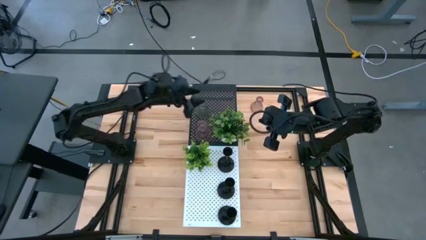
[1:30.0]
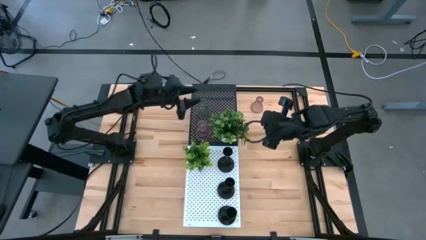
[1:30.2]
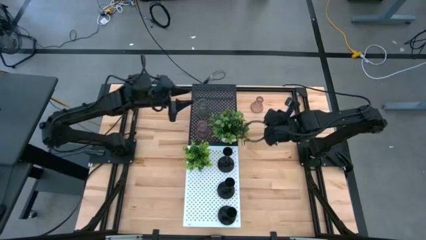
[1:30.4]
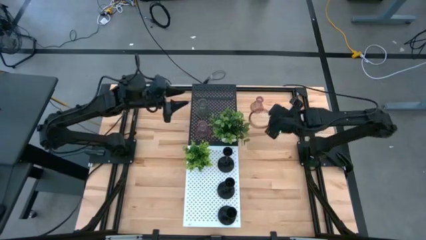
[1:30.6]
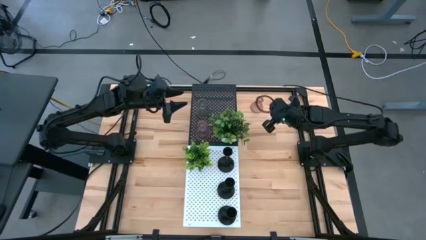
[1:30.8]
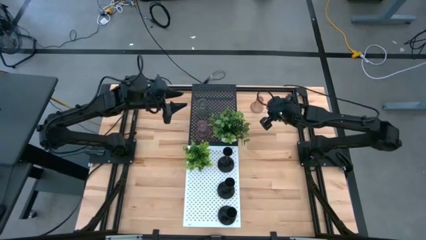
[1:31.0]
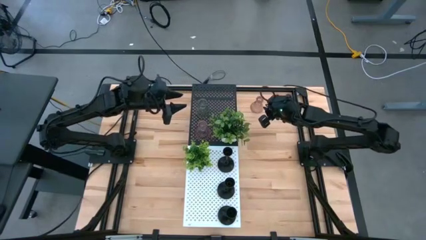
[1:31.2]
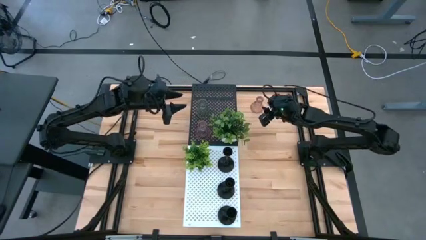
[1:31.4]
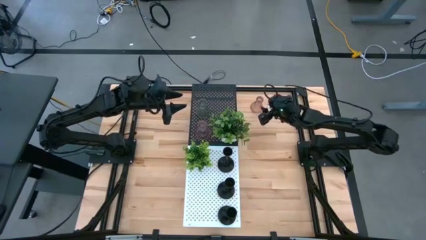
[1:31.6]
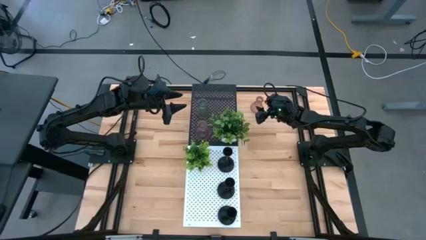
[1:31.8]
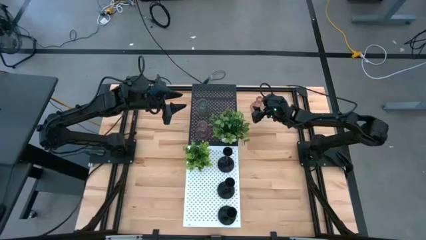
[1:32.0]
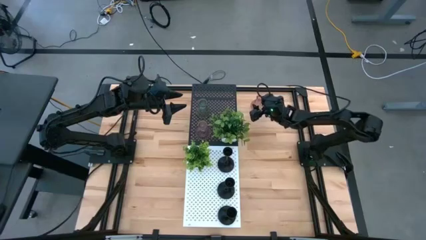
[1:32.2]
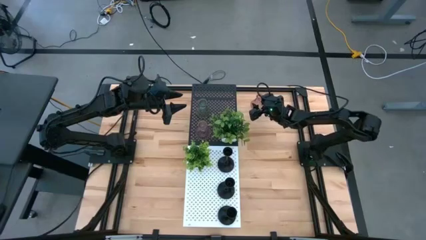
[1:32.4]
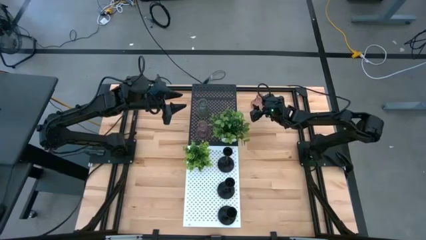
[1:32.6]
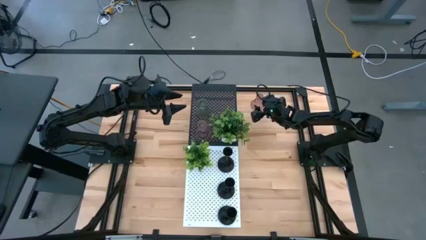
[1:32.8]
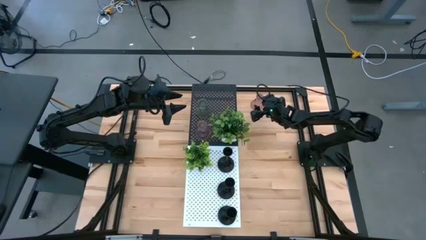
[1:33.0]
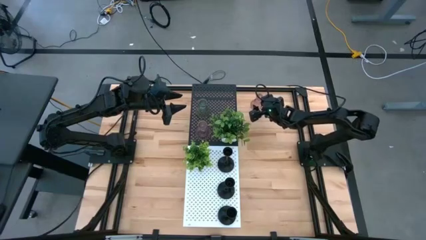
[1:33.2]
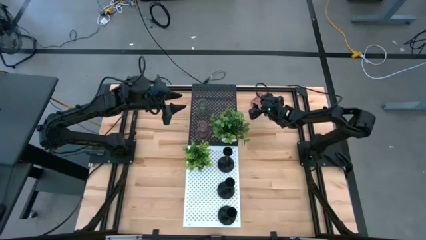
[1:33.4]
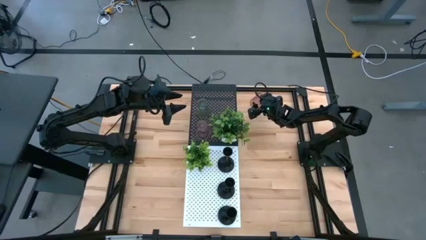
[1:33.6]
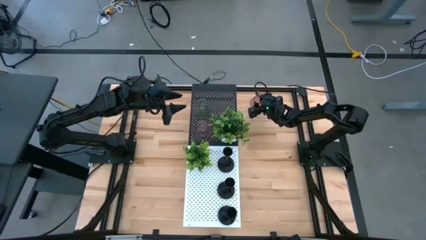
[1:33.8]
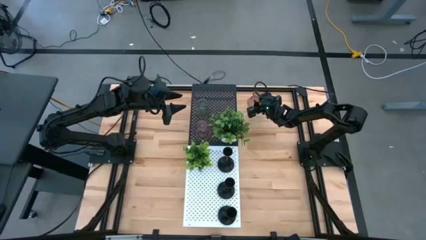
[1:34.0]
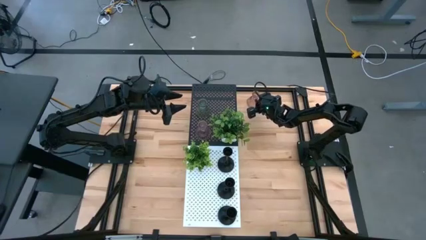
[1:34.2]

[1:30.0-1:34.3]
Task: Pick & Place candle stick holders
Put the pink glass candle holder on the black shelf

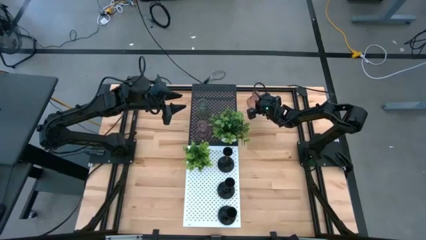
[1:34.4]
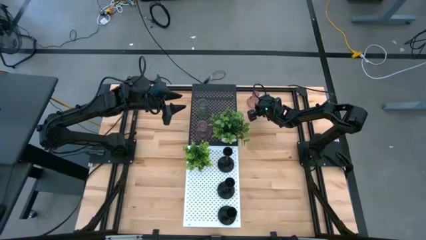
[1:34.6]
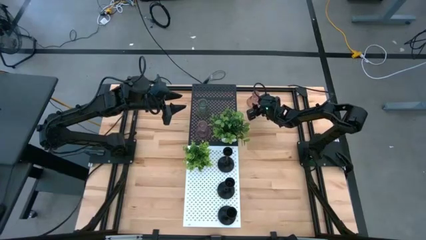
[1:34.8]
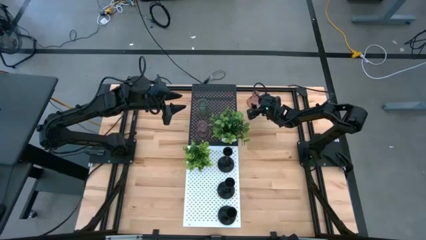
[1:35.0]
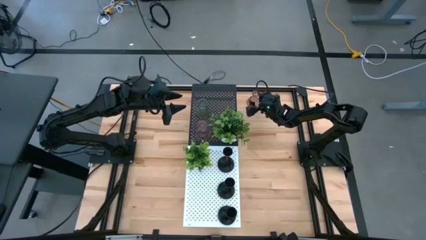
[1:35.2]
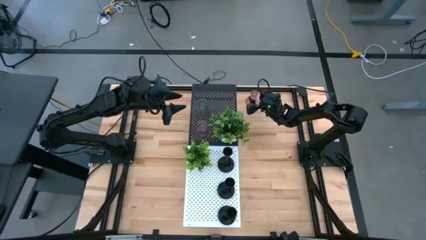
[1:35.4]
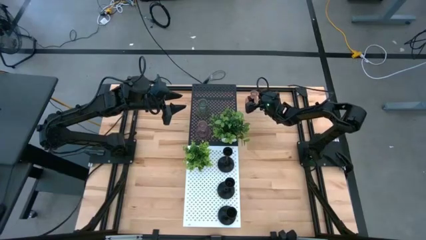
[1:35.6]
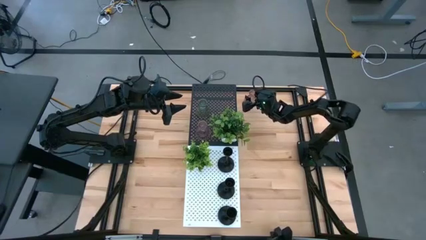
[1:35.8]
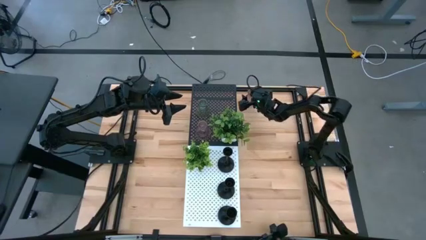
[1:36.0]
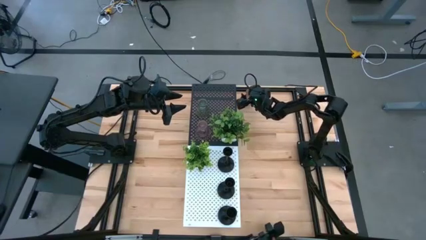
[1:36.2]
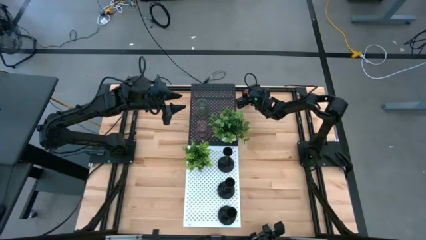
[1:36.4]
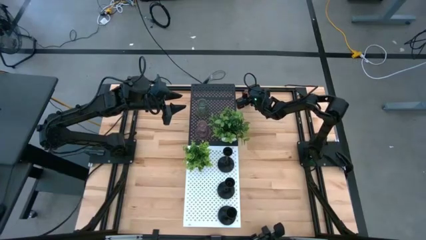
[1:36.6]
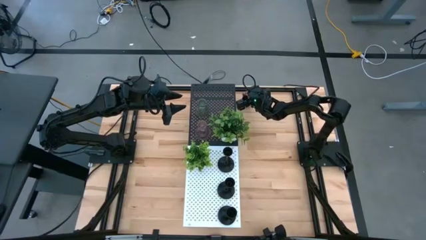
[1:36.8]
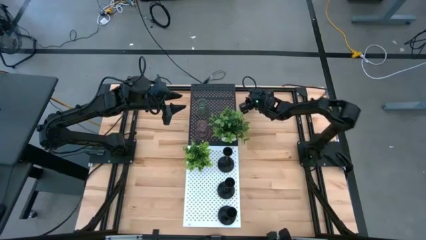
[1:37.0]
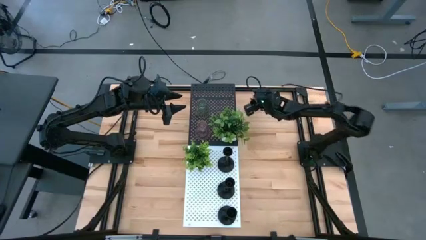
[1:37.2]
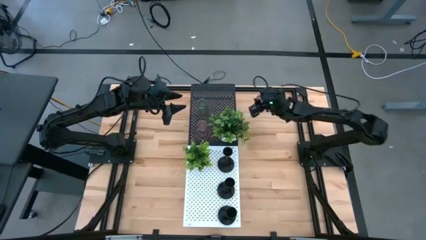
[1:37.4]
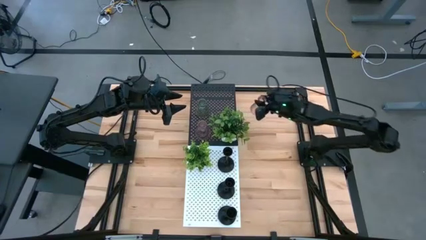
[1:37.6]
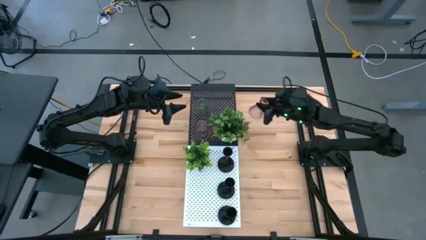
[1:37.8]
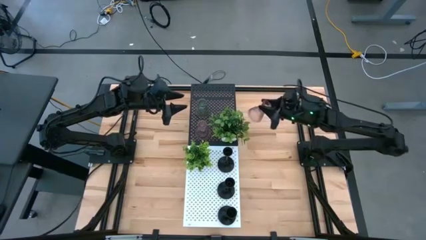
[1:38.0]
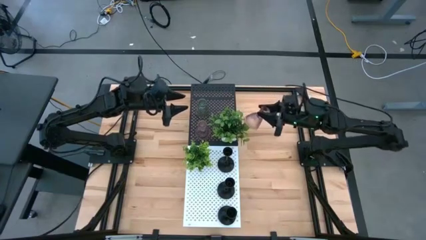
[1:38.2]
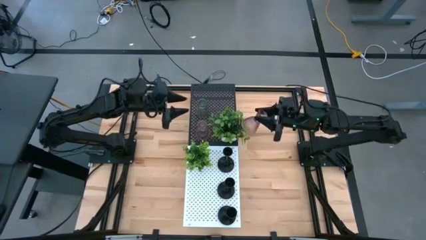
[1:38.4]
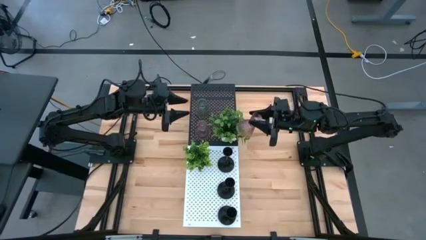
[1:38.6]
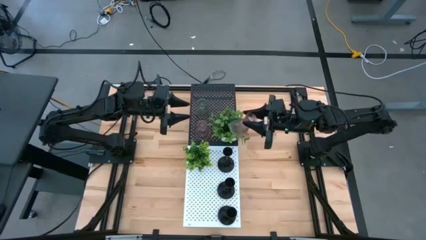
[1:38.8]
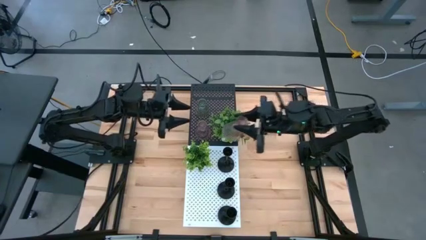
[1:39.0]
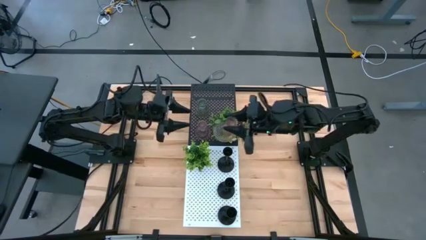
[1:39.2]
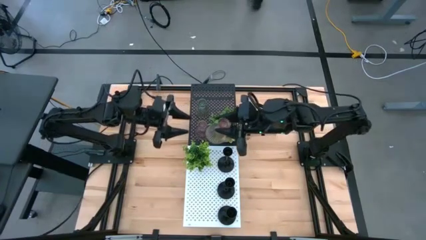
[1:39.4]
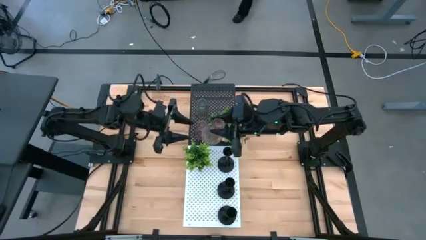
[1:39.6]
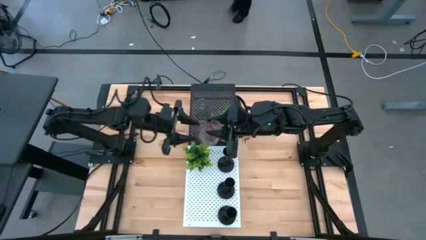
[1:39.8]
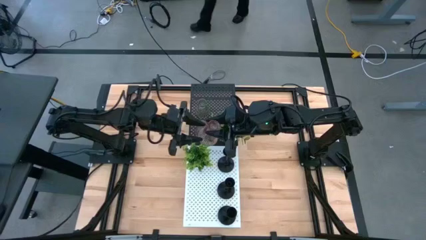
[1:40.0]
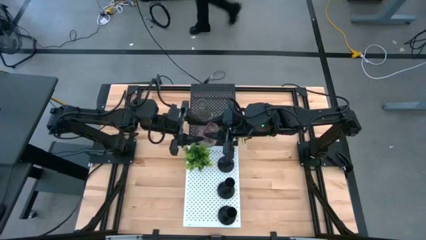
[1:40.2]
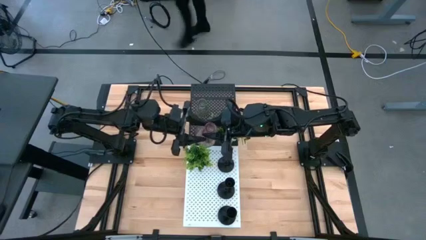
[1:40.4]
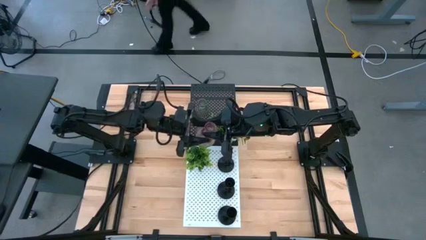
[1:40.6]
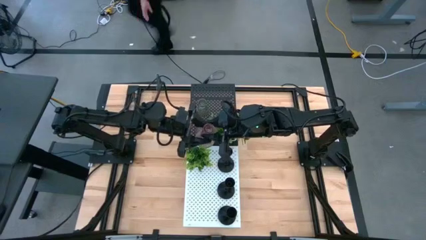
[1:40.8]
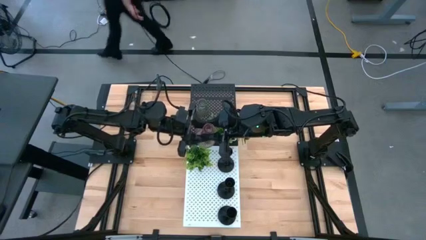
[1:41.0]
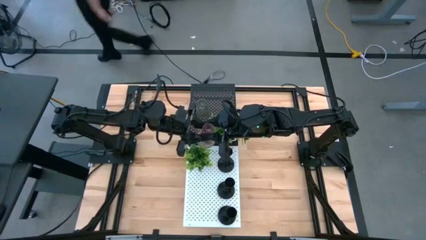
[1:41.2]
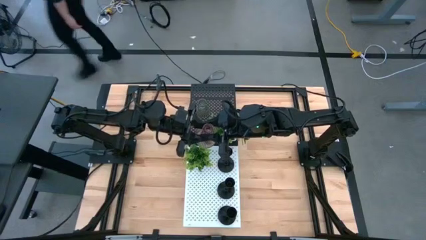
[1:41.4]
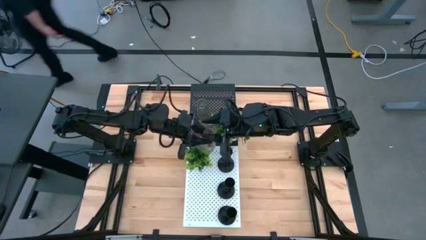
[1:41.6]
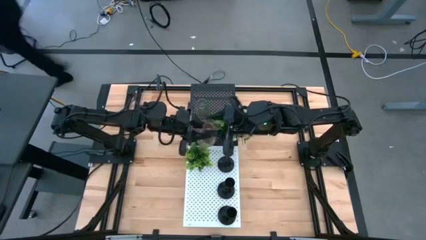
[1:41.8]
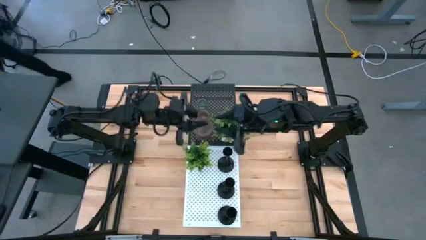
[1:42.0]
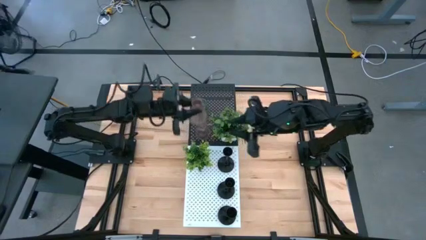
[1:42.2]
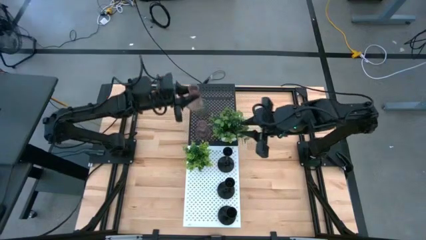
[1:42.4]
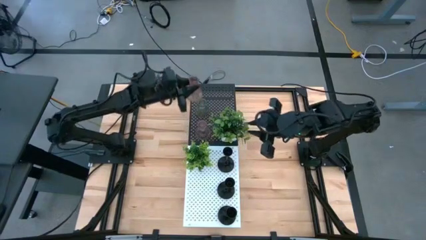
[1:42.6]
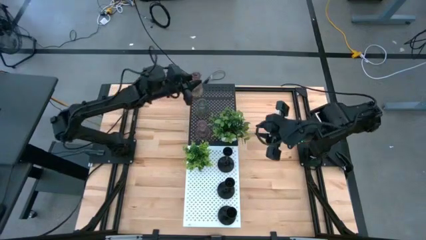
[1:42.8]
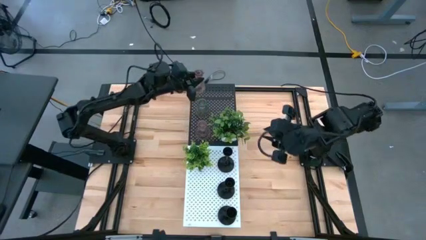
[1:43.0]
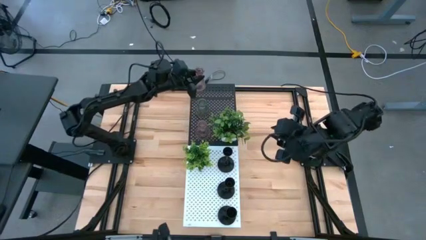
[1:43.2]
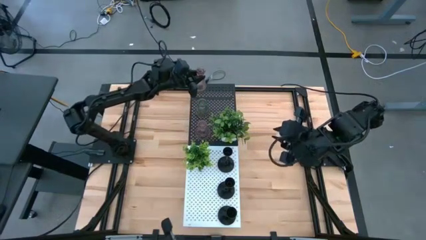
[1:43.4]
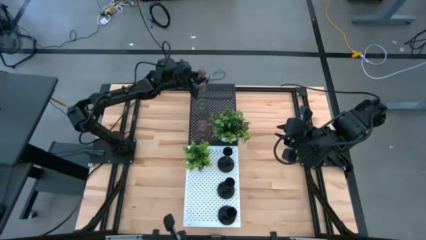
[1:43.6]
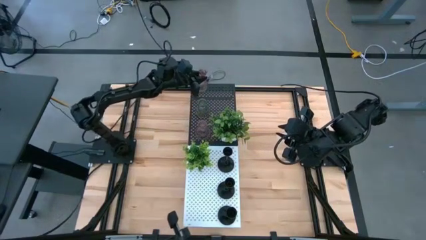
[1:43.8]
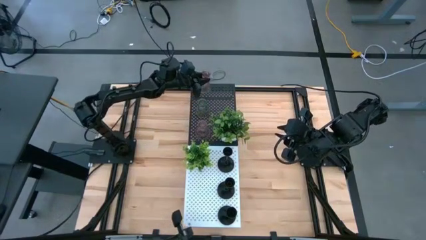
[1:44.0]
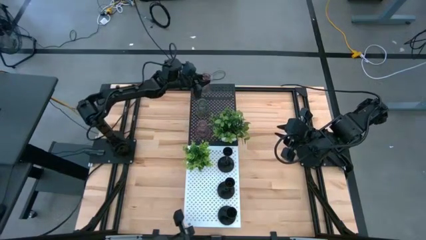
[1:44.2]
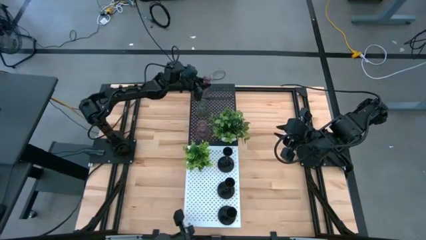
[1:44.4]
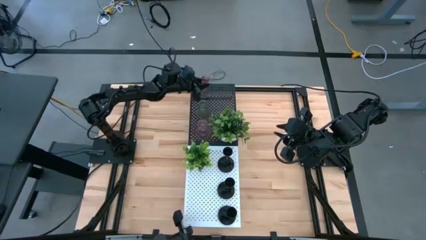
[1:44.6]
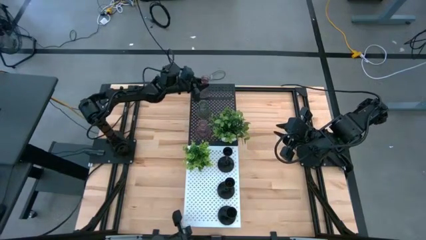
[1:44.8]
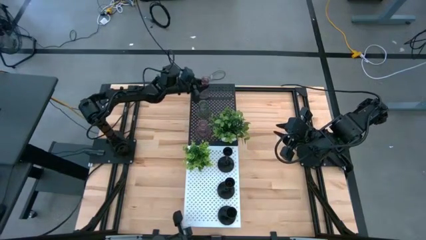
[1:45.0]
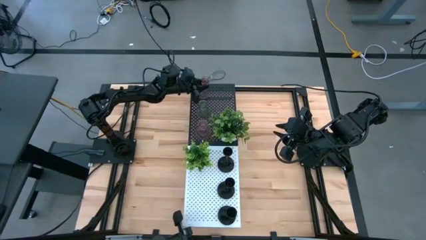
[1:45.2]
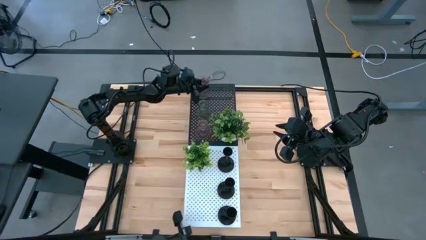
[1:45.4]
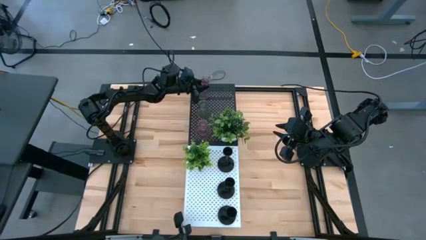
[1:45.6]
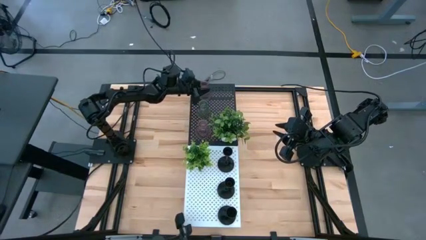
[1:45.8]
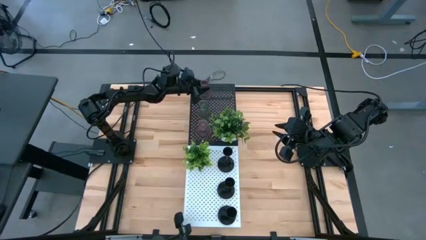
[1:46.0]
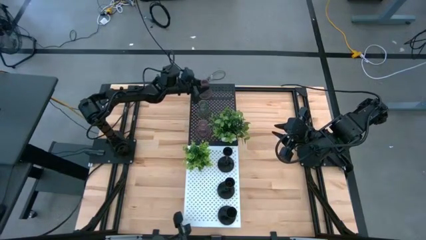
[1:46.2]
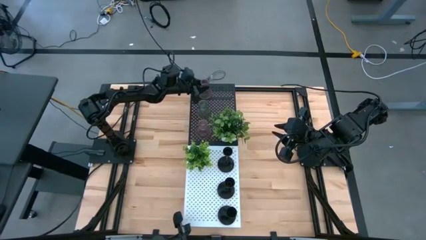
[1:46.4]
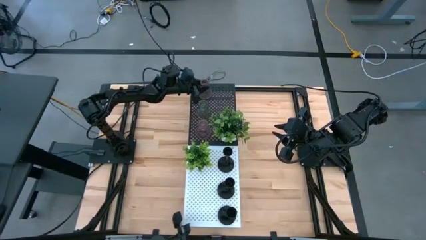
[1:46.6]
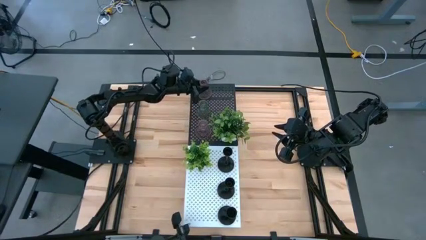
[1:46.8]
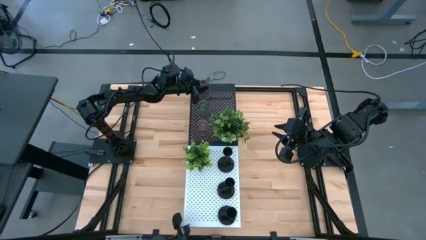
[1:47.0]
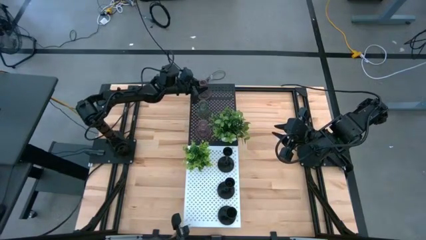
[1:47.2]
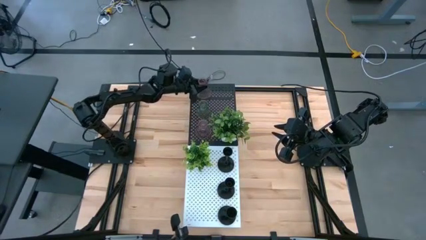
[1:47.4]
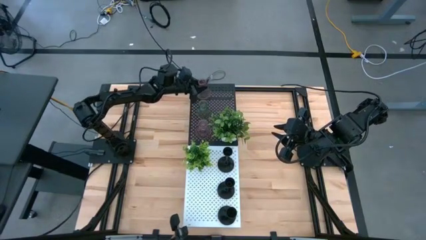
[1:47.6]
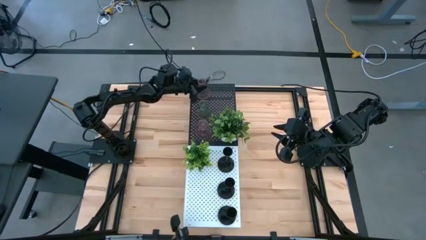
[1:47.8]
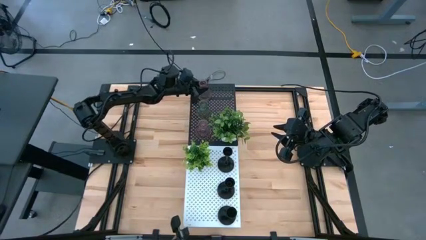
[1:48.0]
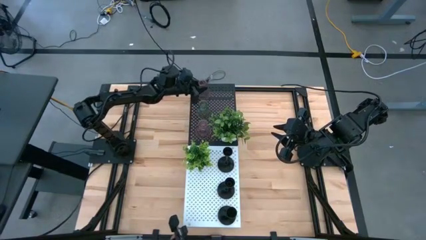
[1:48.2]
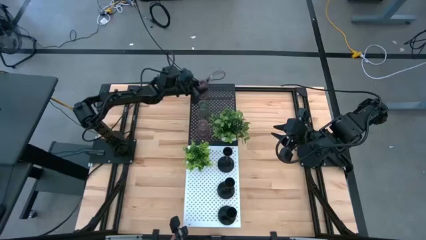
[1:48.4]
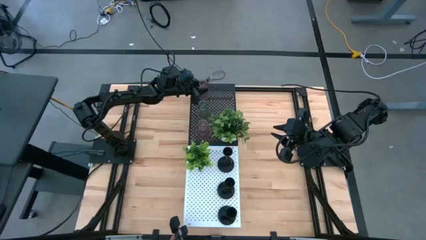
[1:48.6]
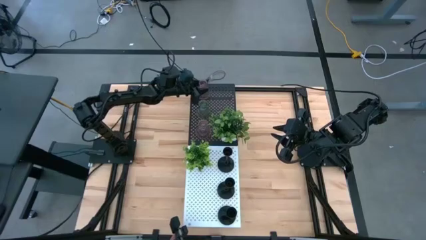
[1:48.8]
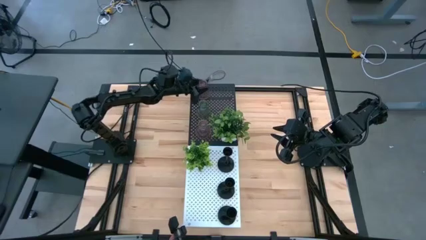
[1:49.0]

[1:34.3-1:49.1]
Put the pink glass candle holder on the shelf
